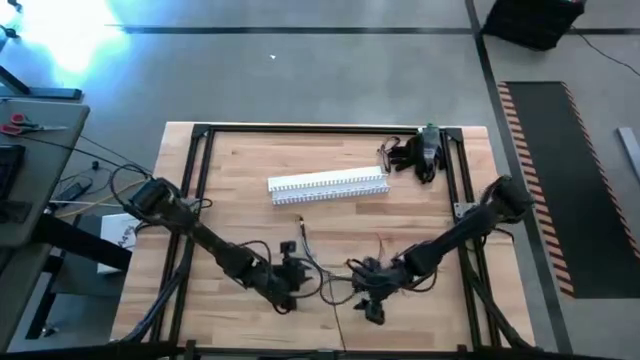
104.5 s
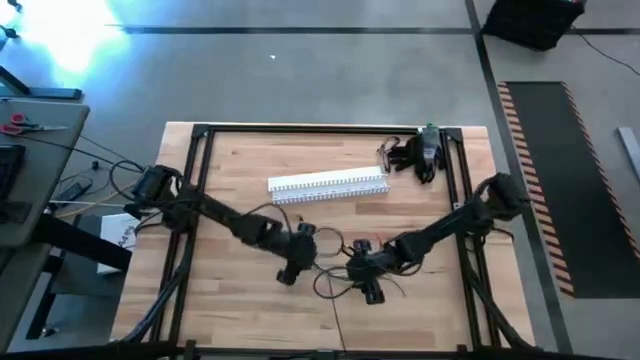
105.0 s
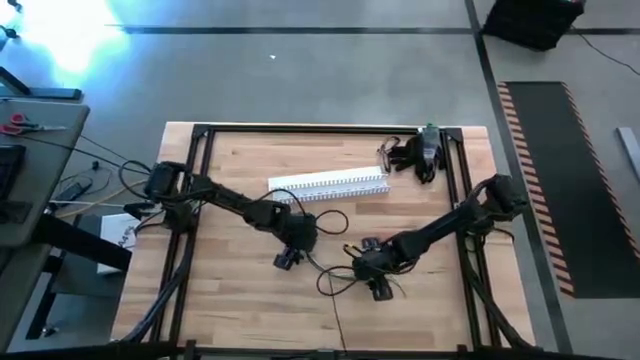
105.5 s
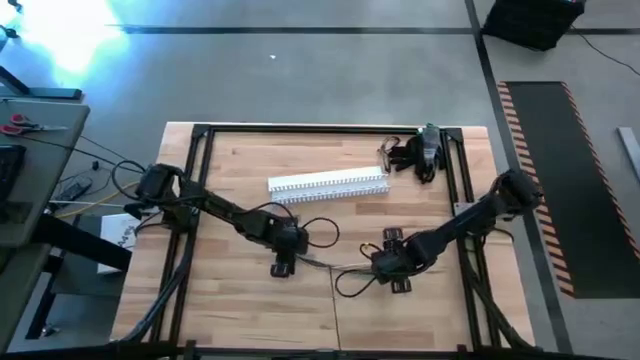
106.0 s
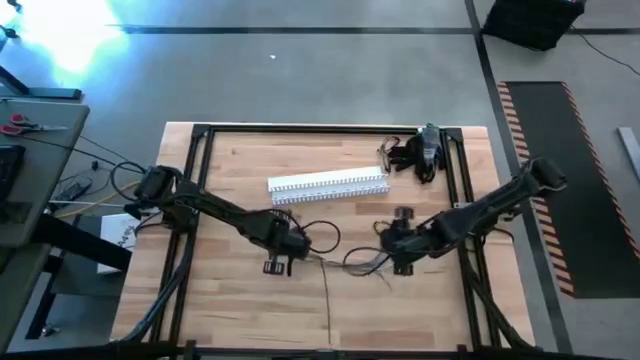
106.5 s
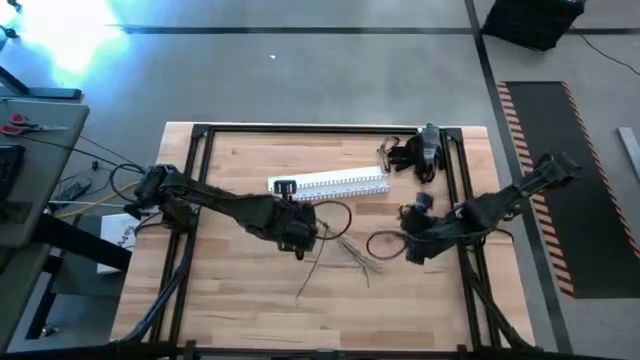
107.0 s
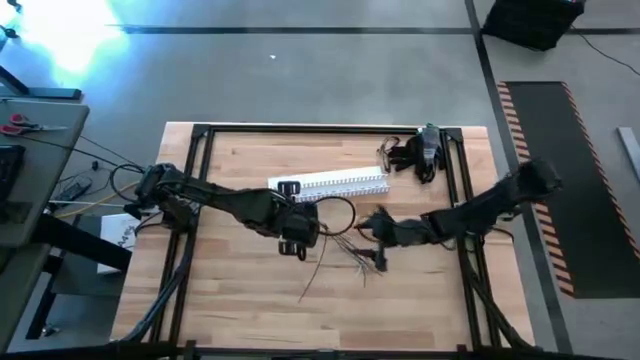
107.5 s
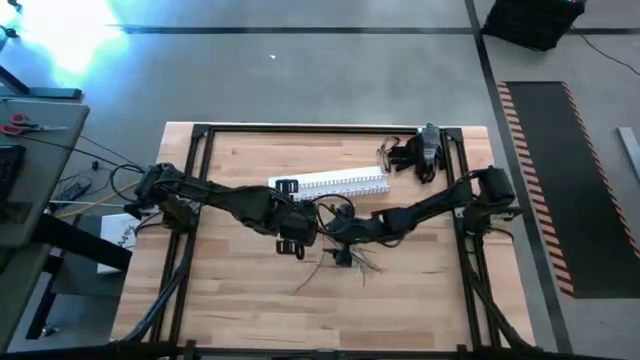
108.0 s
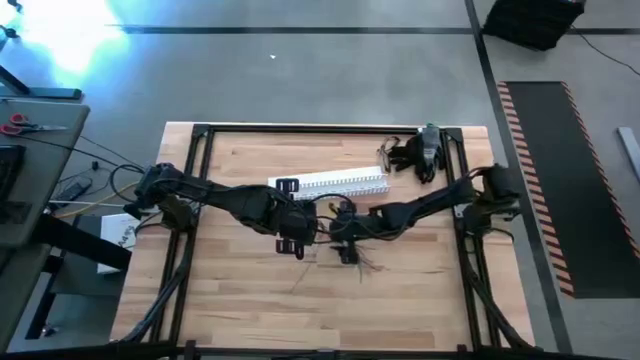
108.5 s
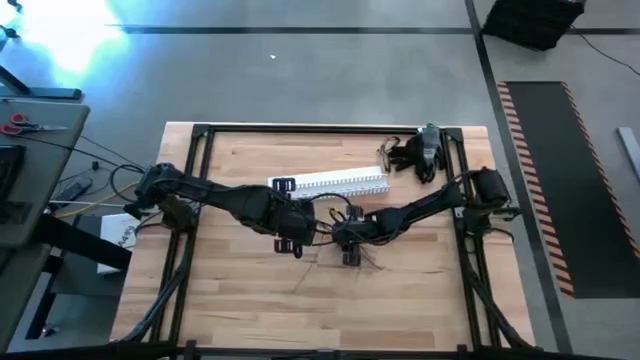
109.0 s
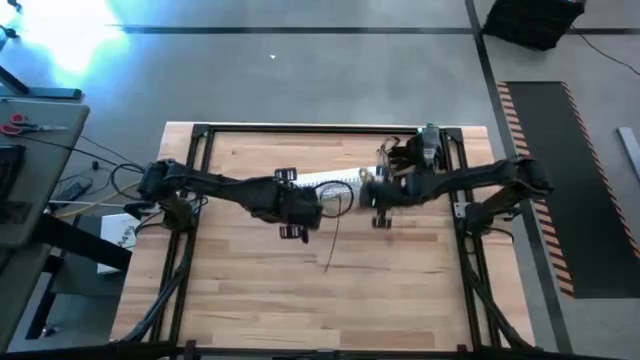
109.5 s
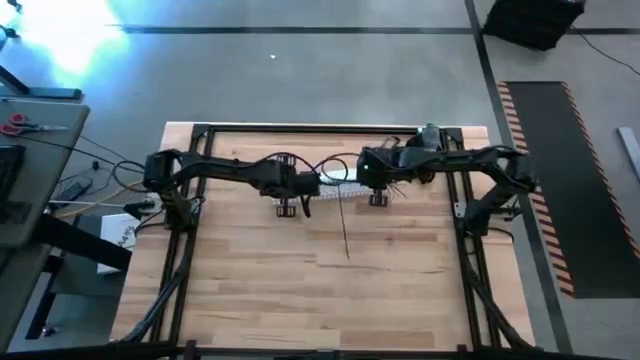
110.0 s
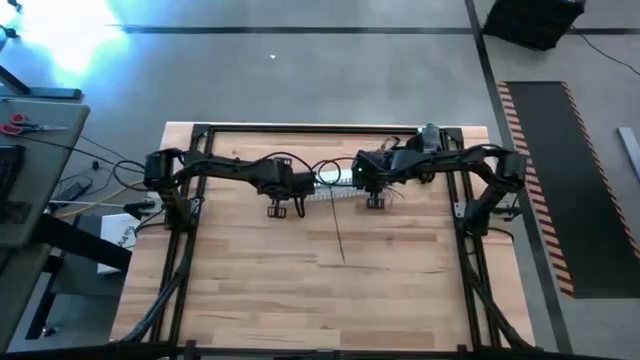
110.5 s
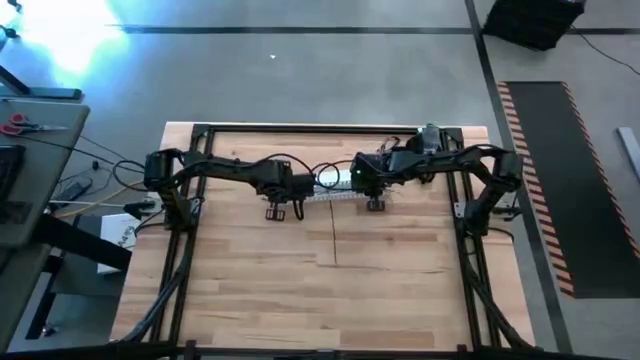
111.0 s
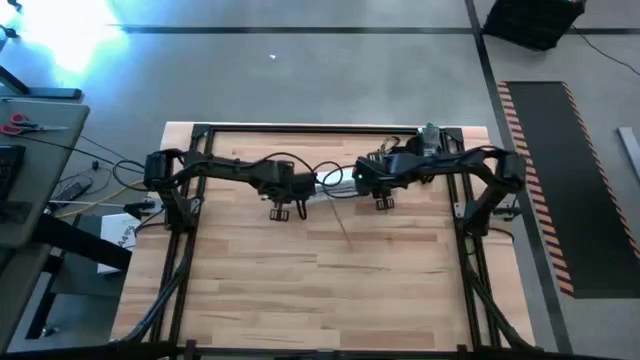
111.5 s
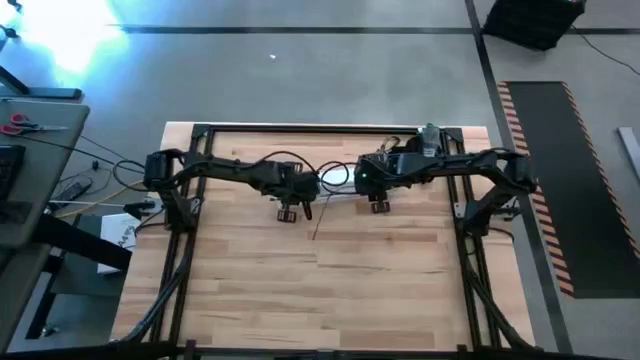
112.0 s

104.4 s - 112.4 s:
Task: Ziptie cables
Put the ziptied cables into the white cable duct

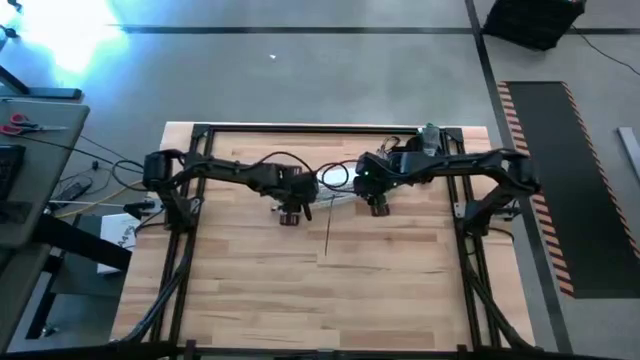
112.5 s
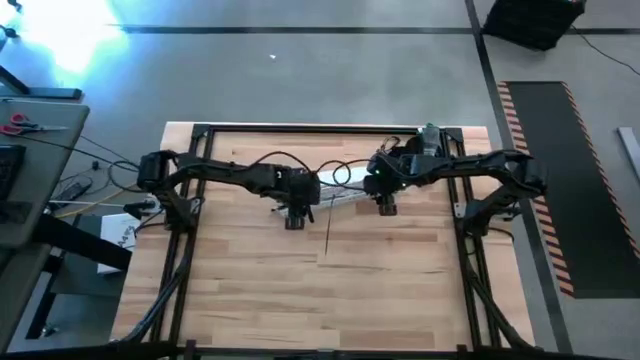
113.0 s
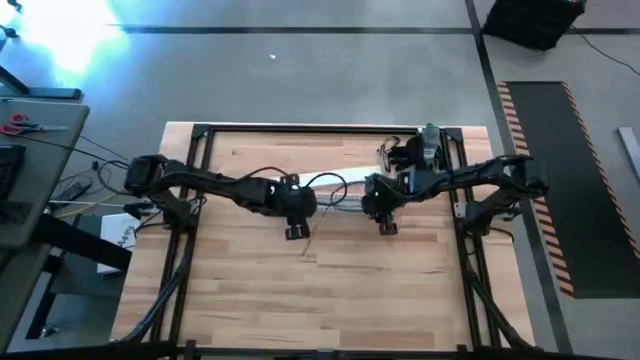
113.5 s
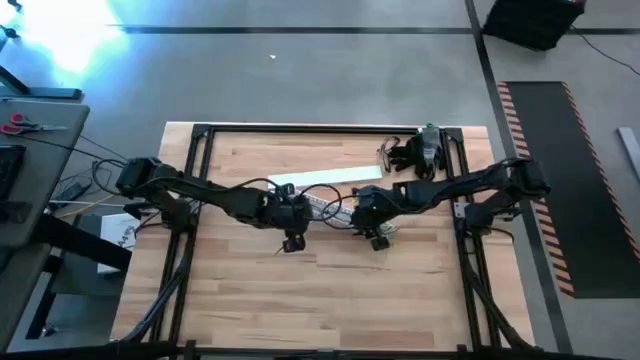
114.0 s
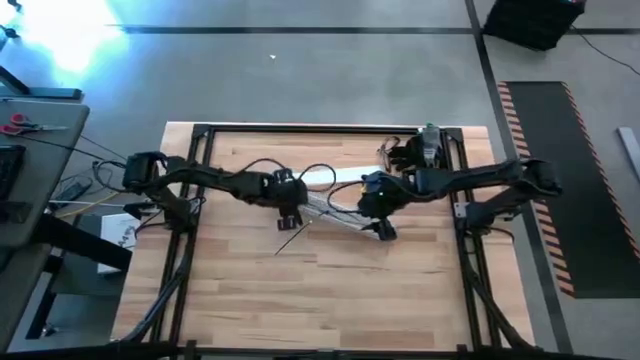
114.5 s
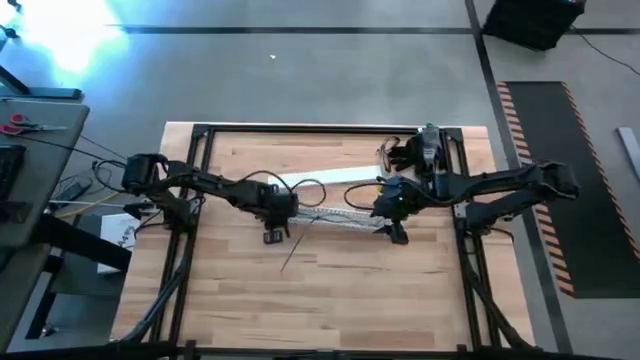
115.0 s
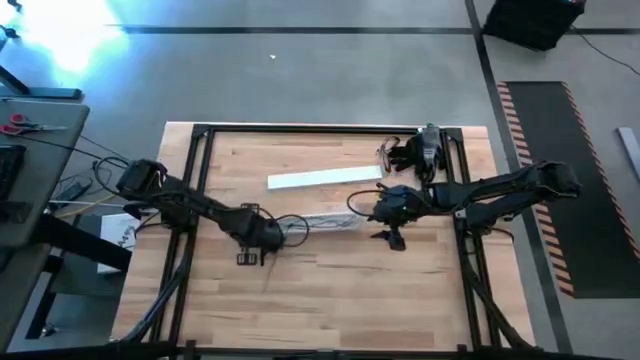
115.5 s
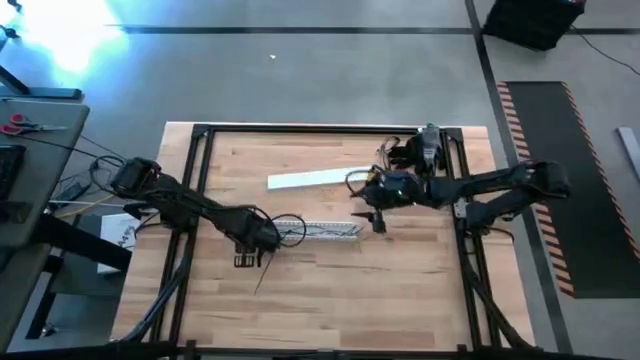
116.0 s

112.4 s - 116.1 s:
Move the white cable duct to the center of the table

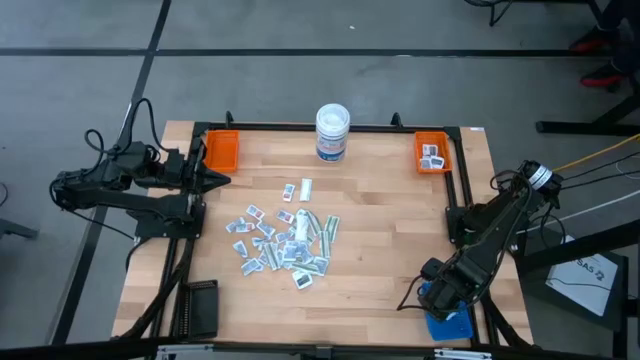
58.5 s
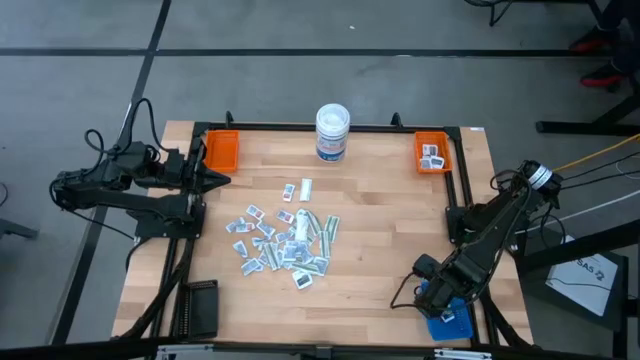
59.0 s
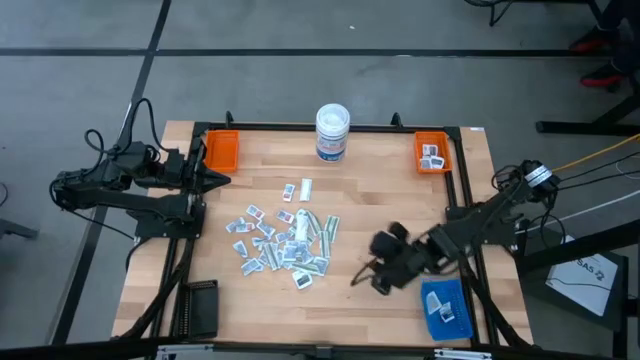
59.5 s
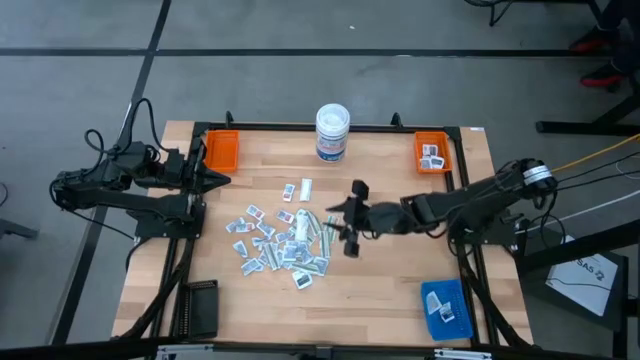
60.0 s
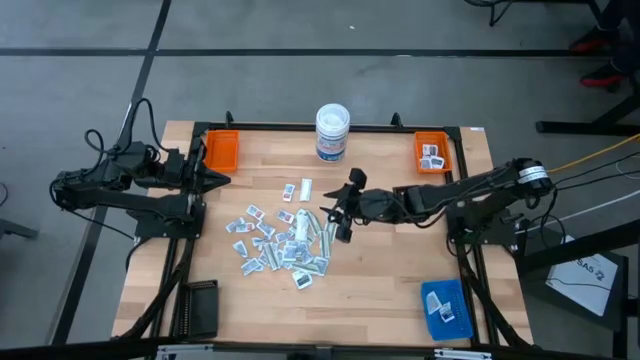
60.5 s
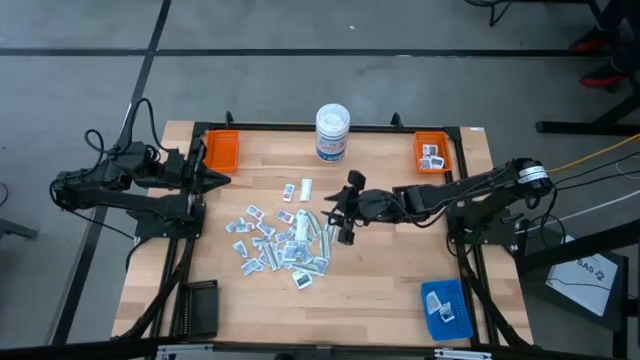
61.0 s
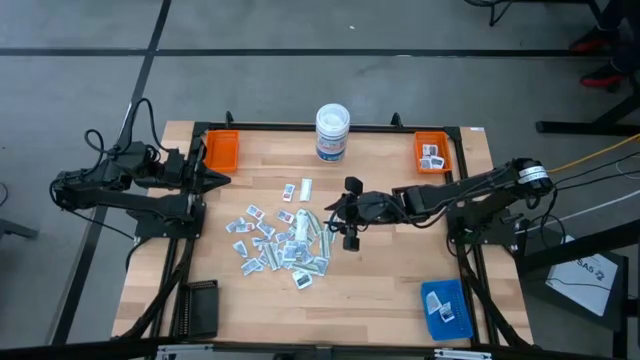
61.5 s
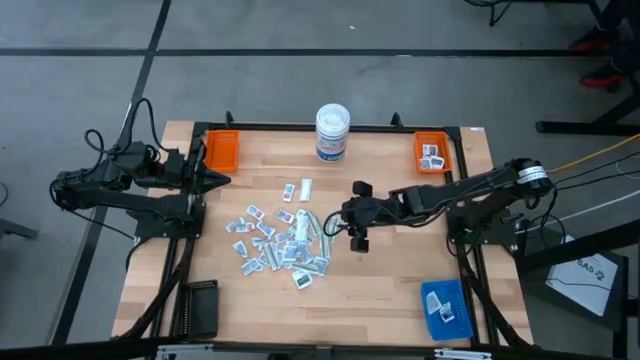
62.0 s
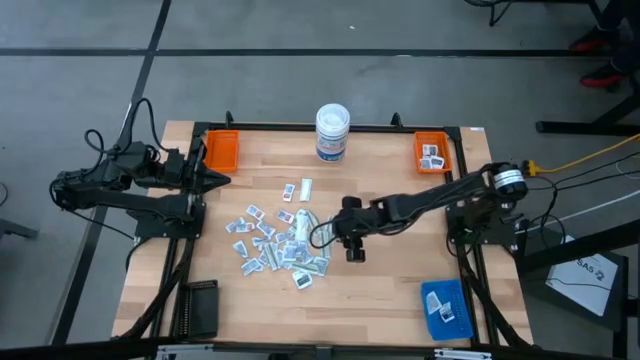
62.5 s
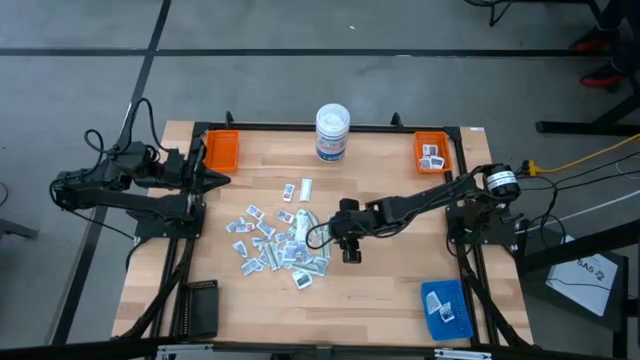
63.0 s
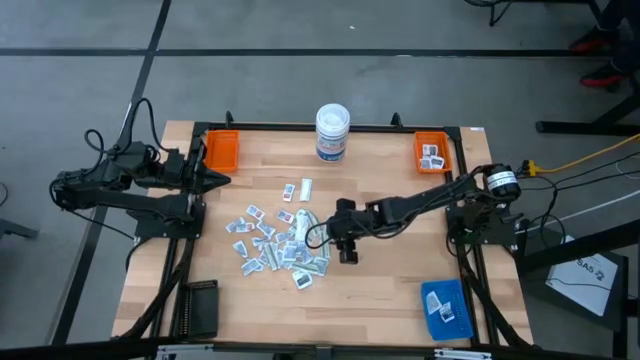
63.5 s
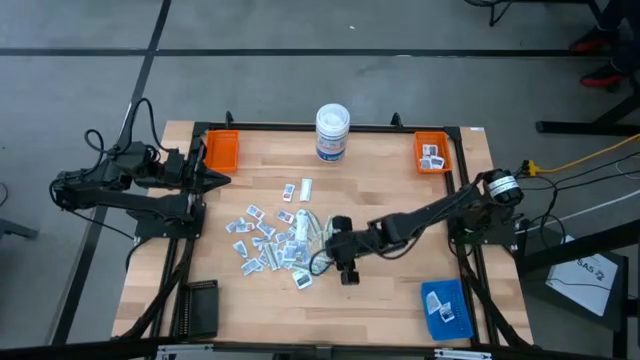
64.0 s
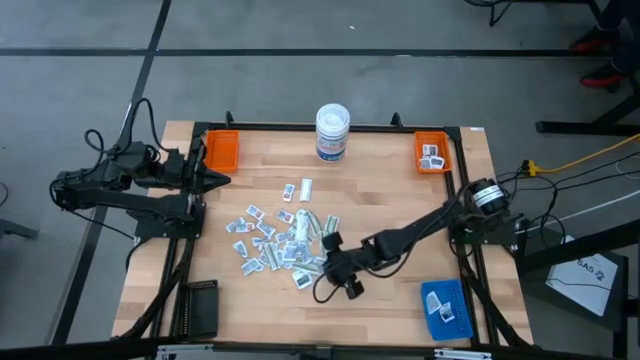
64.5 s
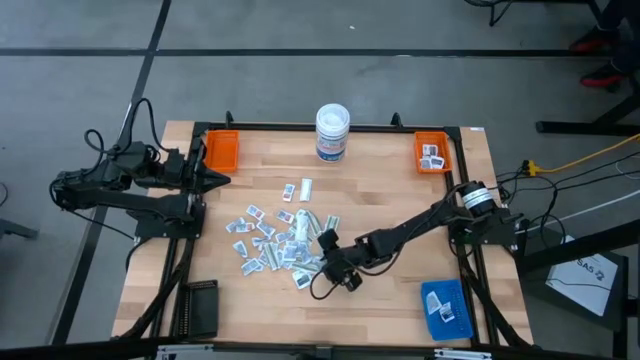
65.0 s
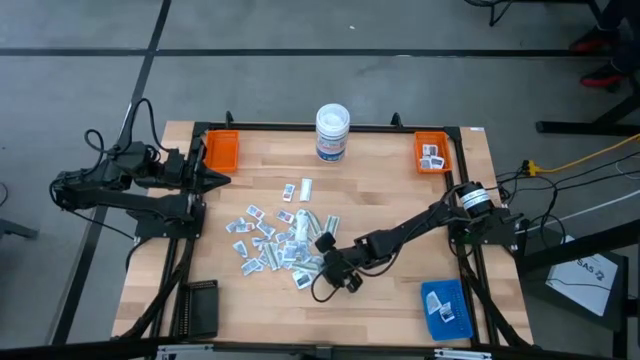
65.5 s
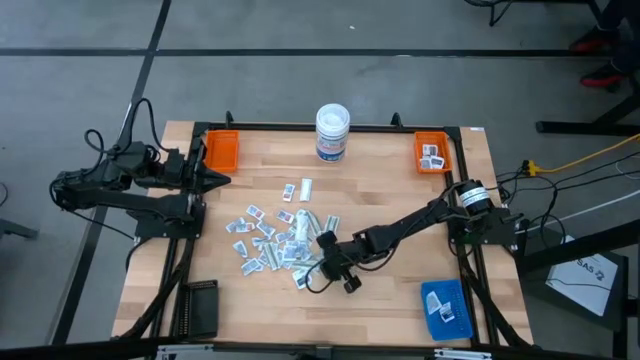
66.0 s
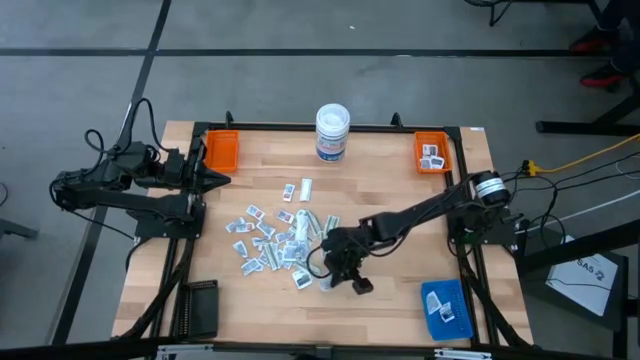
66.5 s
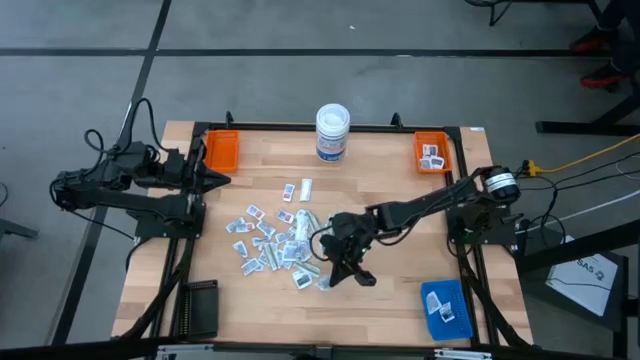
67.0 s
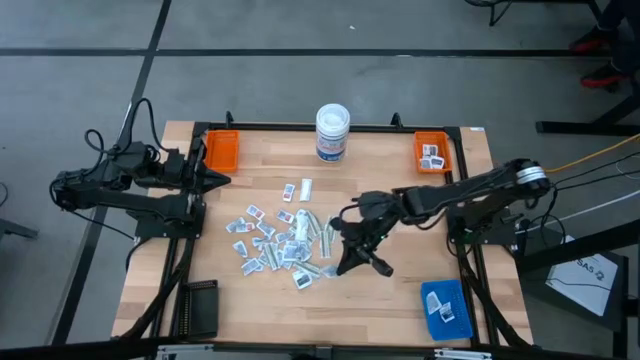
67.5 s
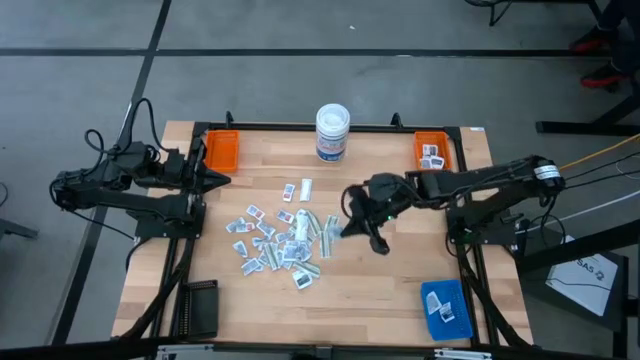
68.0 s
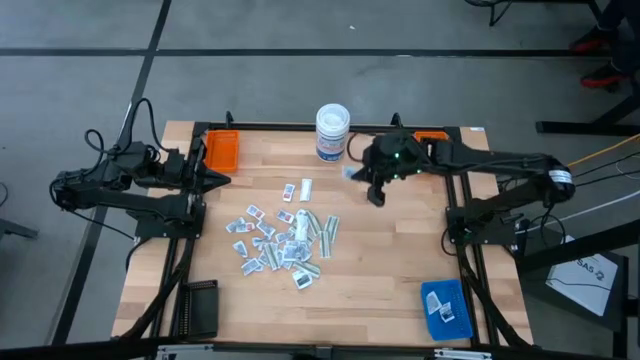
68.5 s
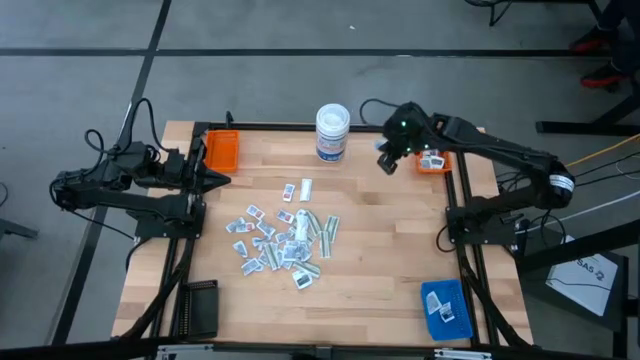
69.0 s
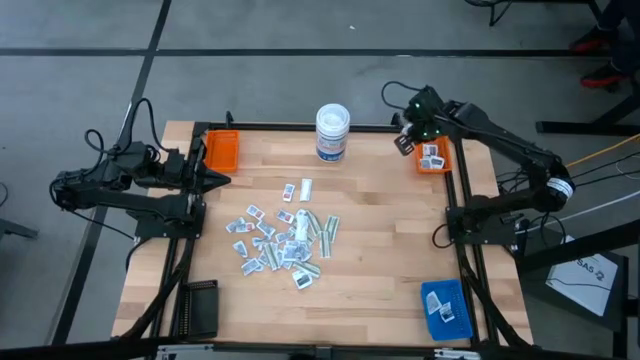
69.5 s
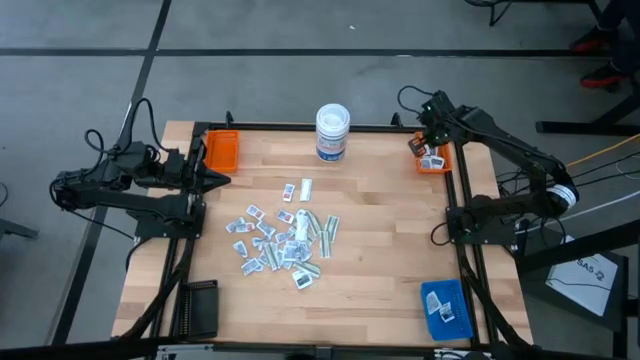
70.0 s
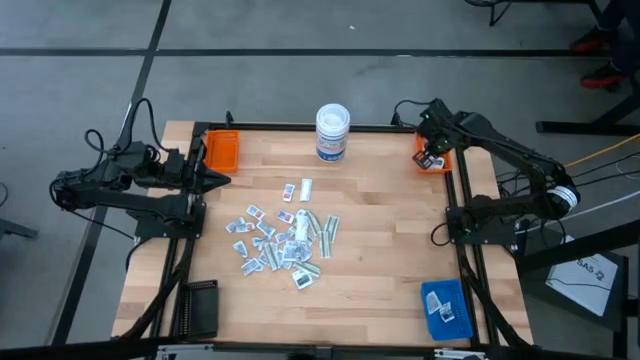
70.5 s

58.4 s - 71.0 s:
Task: Pick & Place First Aid Supplies
Put the gray towelette pack into the right orange bin
